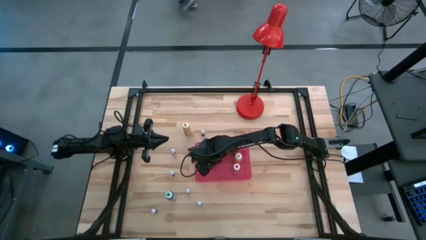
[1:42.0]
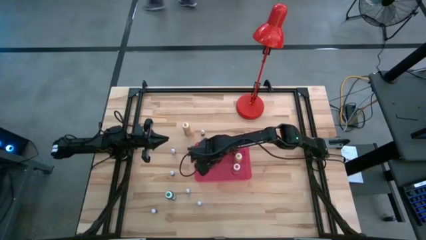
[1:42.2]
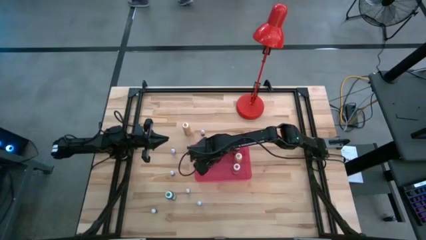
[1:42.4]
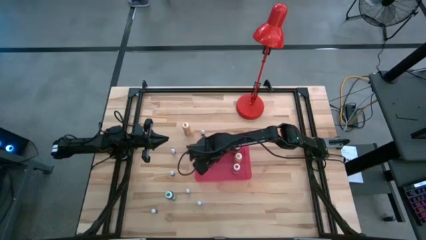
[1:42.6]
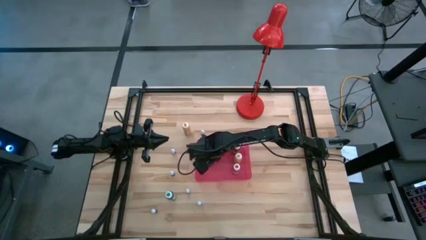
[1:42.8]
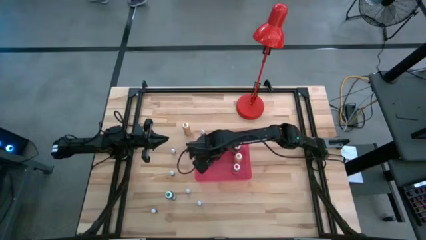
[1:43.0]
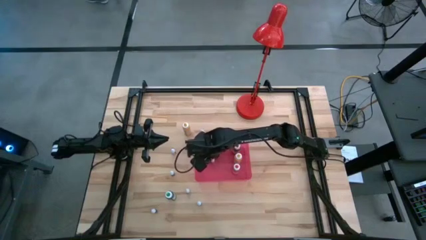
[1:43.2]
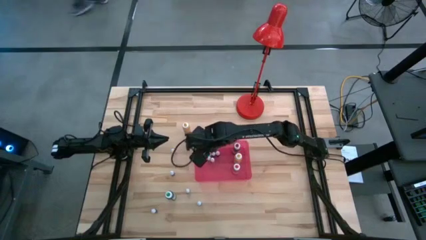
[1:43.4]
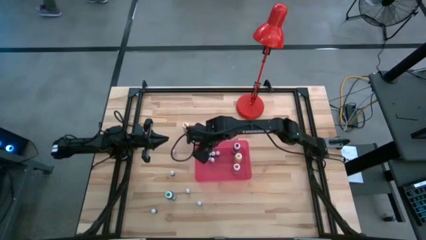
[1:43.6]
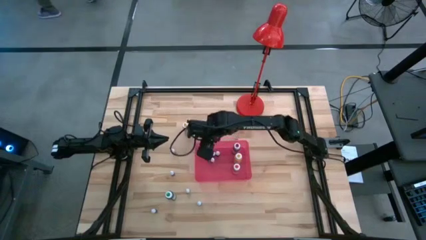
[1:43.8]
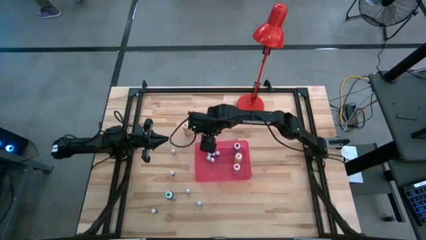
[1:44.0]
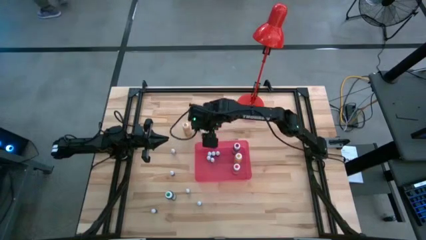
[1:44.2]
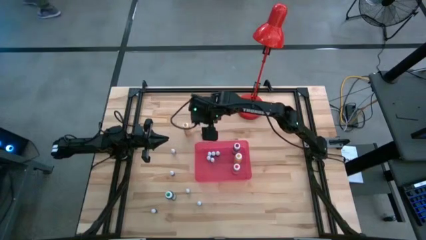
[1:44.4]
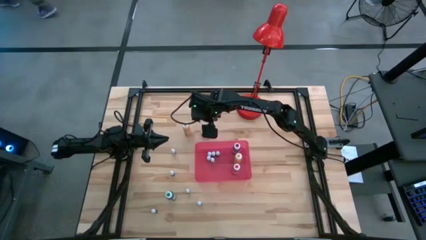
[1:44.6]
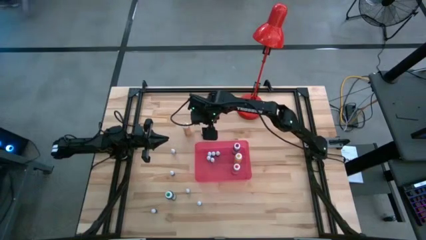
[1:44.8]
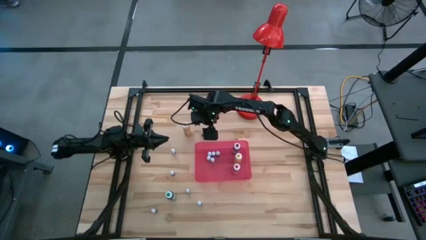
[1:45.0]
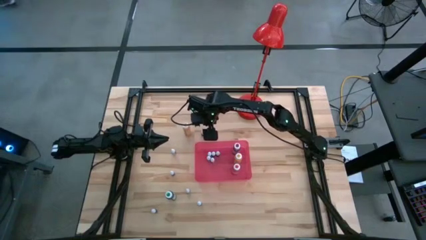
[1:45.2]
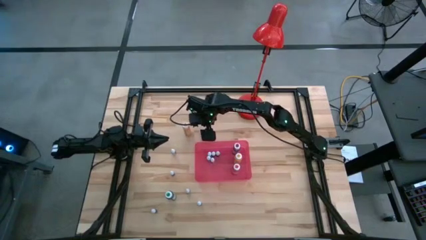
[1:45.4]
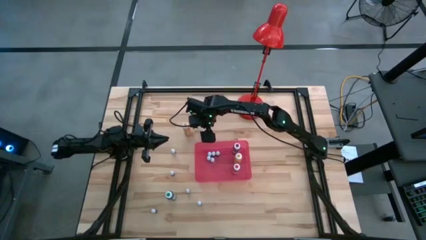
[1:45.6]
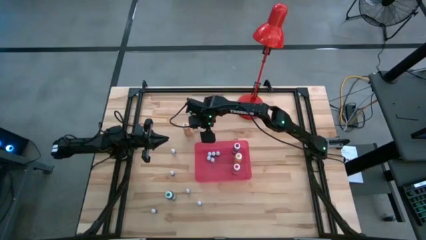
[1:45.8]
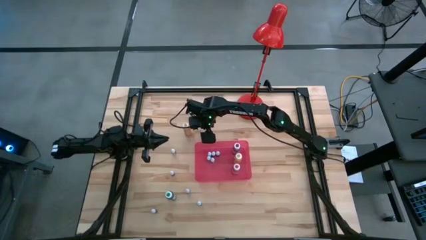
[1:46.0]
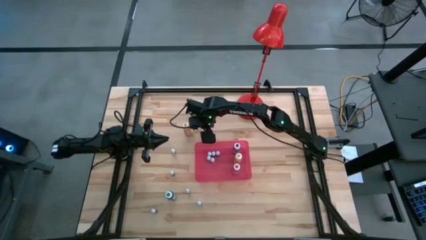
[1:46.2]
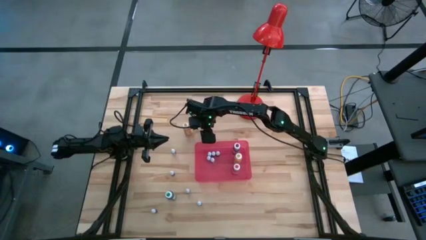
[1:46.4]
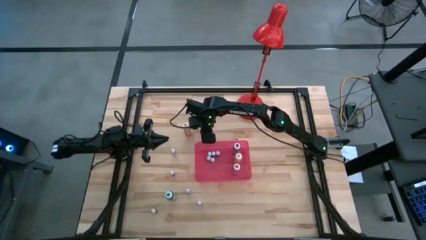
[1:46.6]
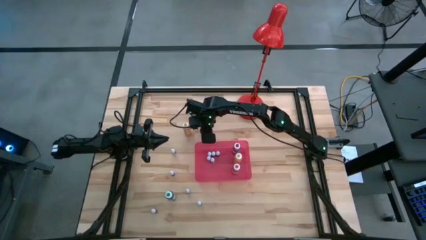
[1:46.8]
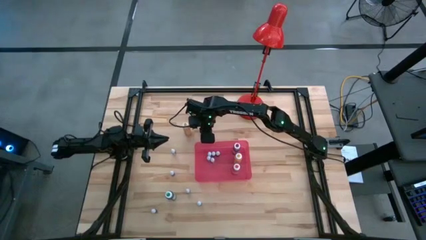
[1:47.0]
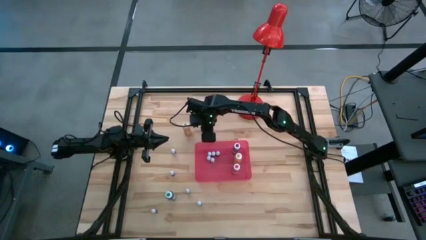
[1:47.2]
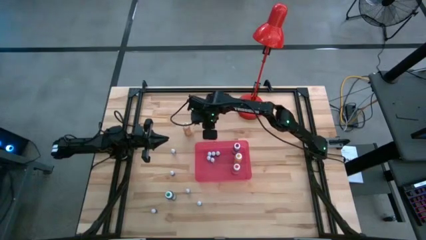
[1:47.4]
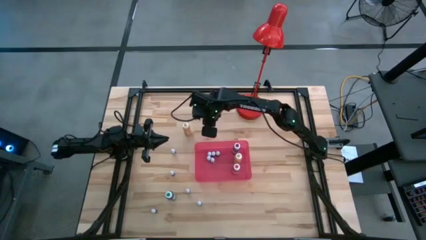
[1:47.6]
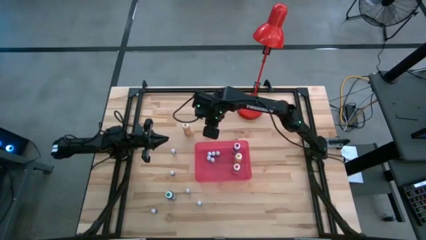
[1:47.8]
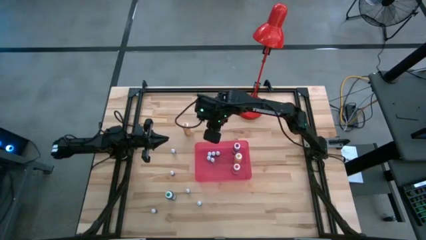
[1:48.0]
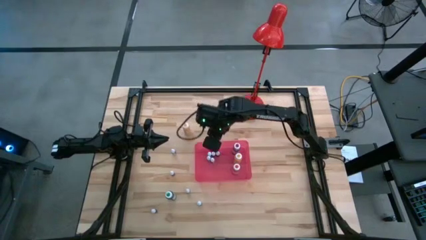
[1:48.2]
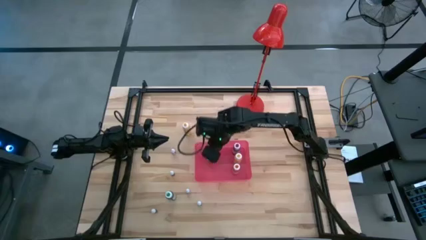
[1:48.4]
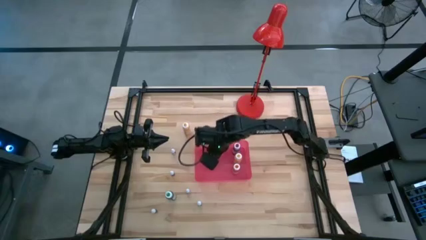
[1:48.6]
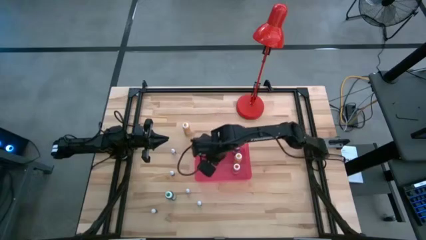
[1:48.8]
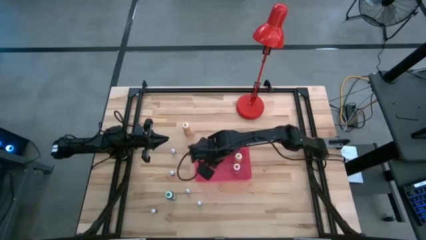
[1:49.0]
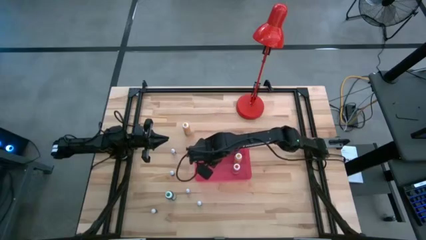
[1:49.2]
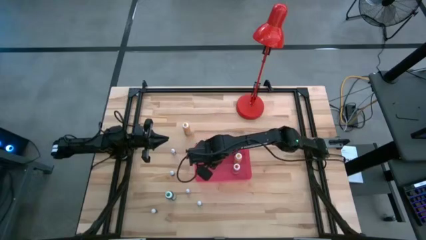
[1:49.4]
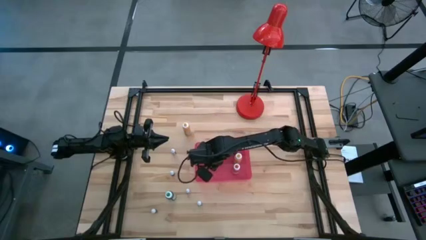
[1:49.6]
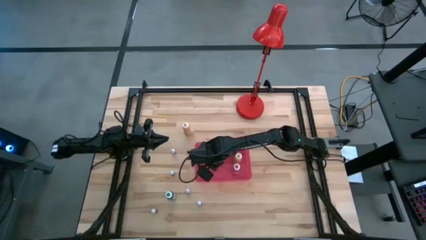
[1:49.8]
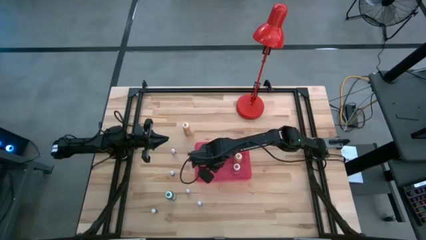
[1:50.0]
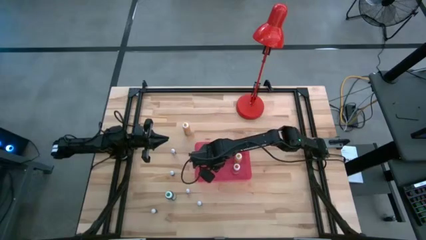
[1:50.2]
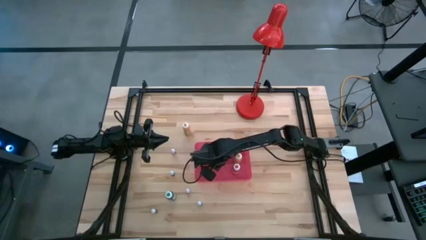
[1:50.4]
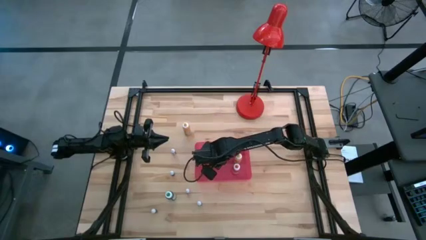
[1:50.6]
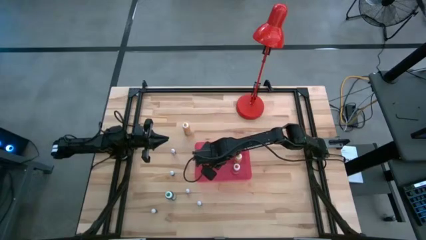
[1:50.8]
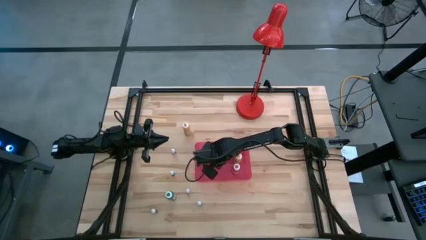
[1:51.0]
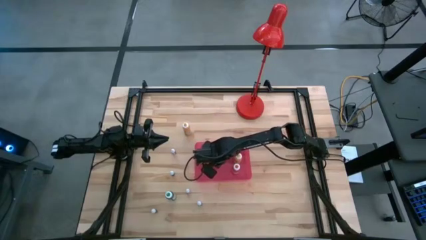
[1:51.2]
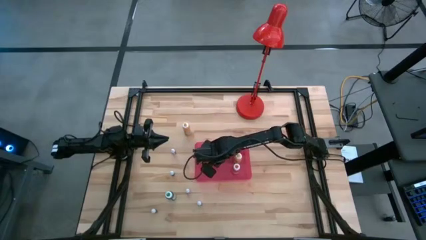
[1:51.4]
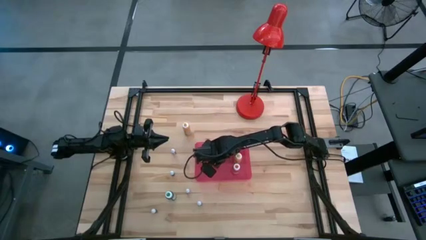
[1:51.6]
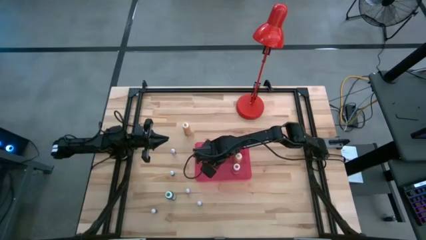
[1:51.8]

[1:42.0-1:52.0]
Task: Pick & Place food coloring
Put the small green food coloring bottle into the red bin

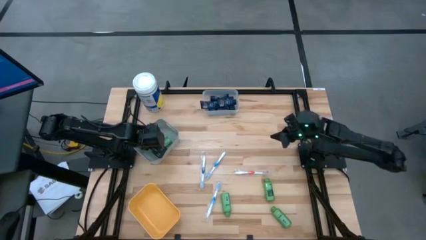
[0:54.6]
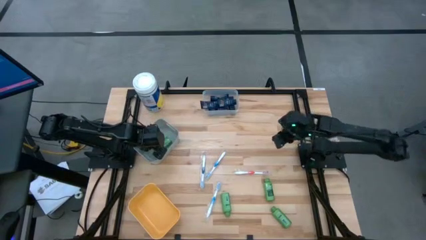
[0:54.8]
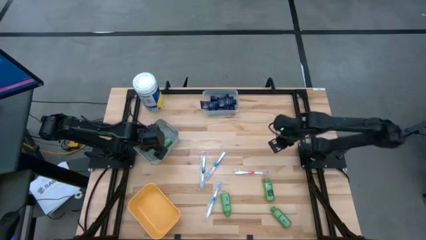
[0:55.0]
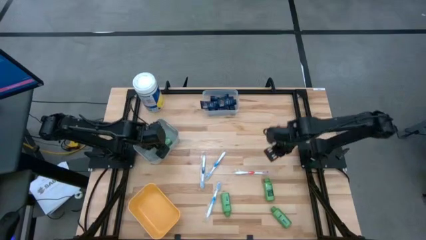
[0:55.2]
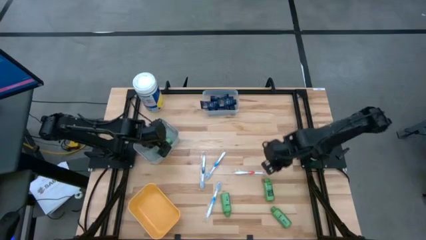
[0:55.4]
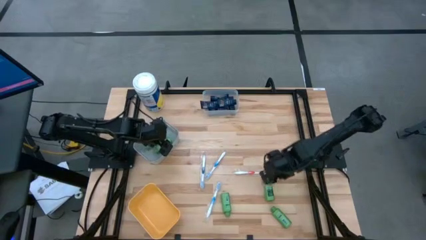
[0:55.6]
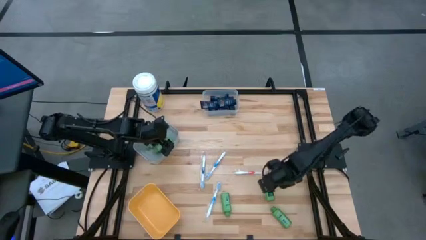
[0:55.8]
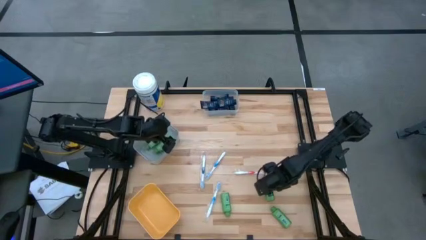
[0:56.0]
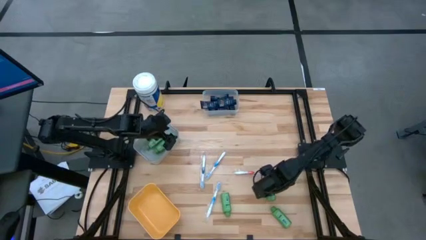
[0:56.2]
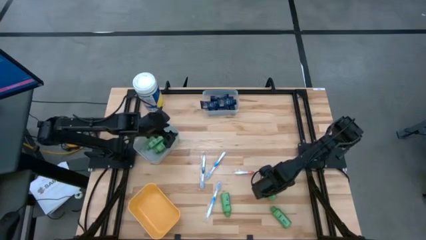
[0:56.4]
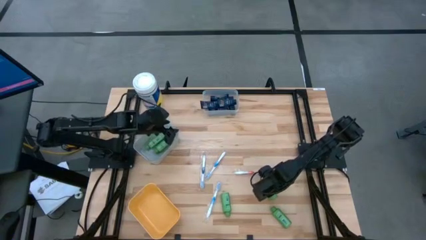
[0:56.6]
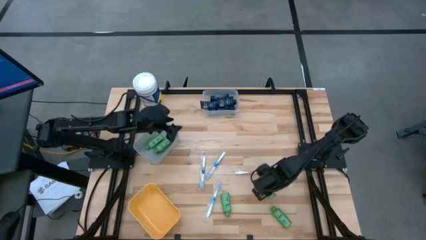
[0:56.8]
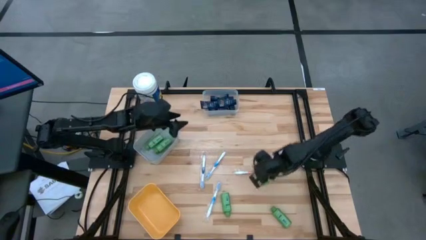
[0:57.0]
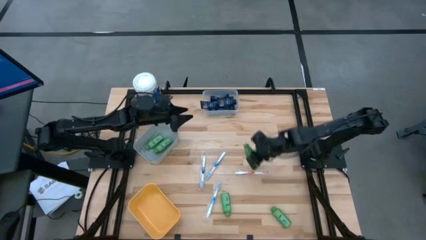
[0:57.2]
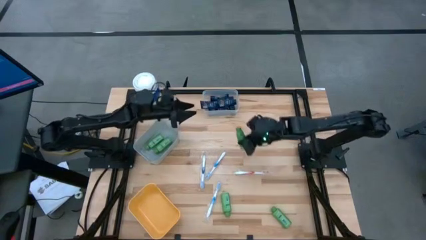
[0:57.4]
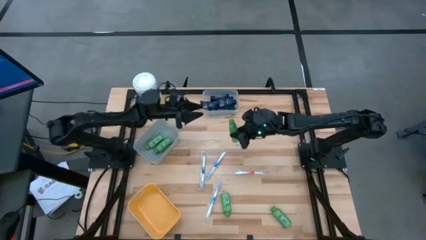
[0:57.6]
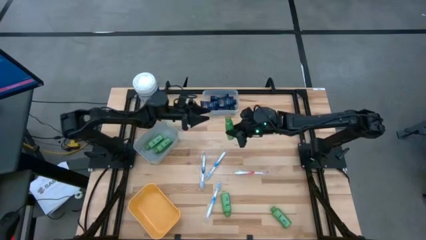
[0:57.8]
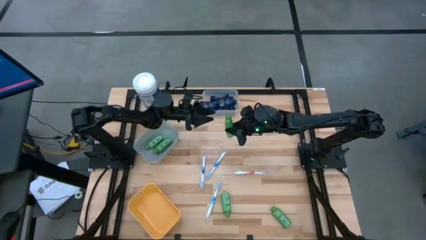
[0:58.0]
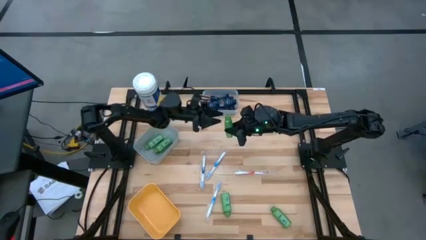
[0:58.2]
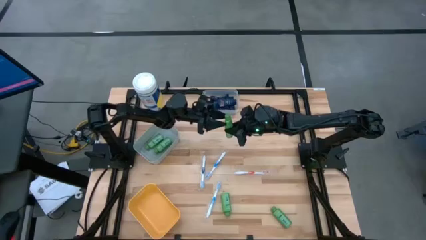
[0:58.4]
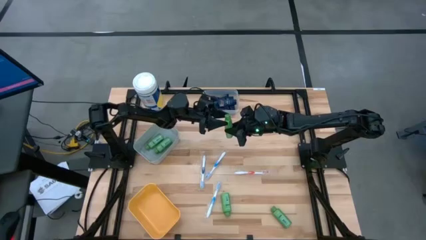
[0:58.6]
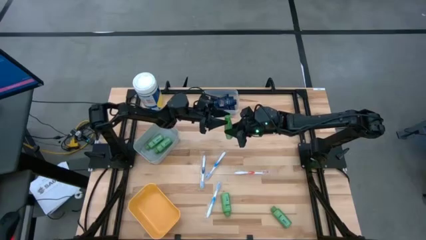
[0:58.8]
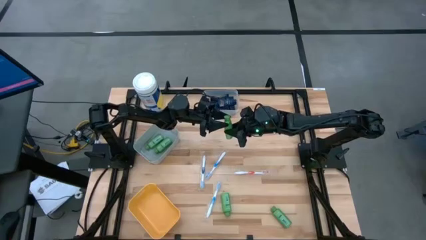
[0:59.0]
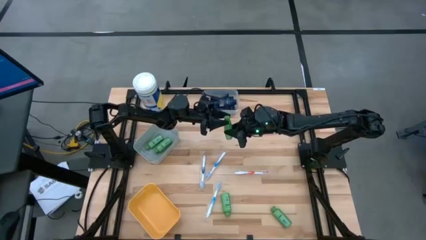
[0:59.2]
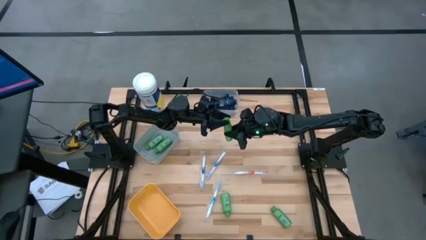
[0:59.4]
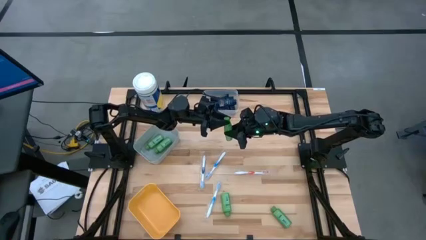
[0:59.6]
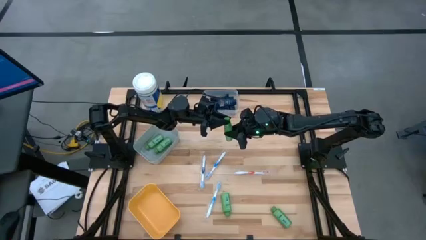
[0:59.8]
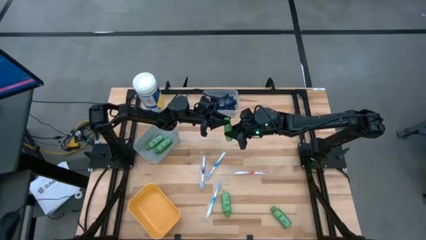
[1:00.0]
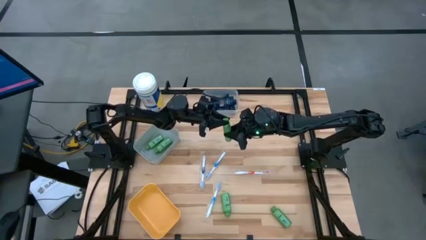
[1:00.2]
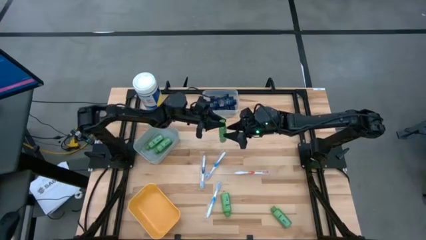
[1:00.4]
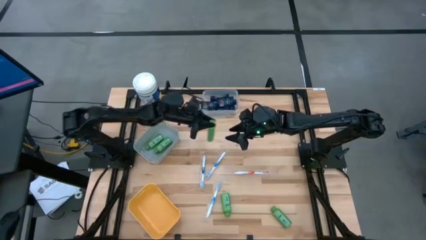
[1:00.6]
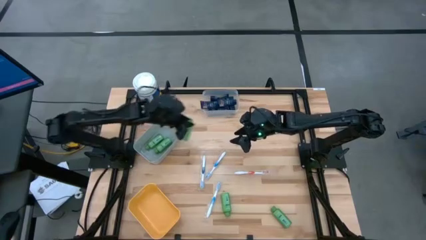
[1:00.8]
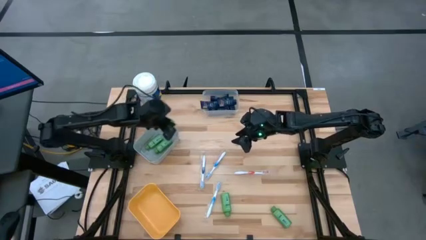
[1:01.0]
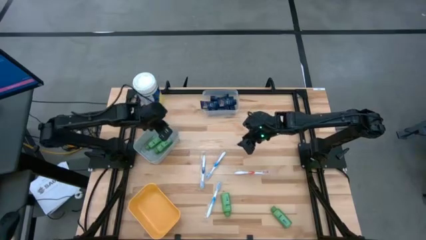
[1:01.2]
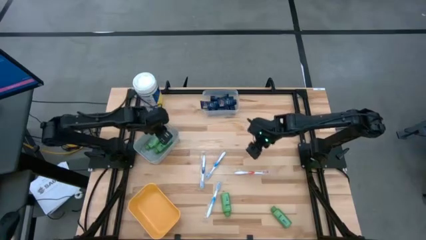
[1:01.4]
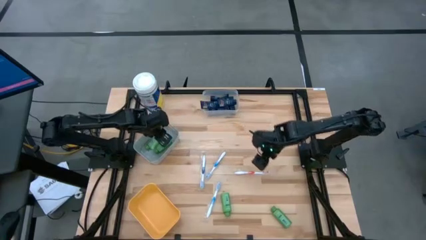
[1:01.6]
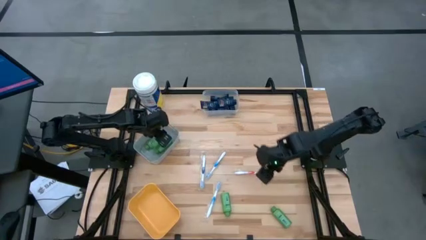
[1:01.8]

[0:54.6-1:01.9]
Task: Pick & Place Travel size toiletries
Put the green shampoo into the gray bin
